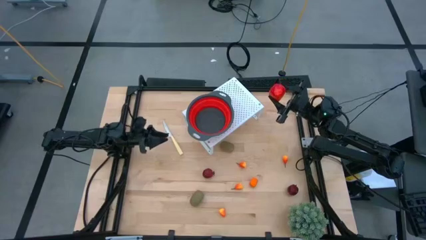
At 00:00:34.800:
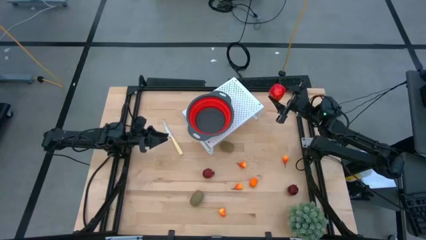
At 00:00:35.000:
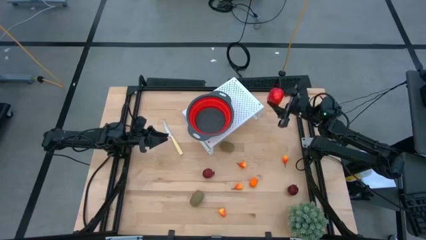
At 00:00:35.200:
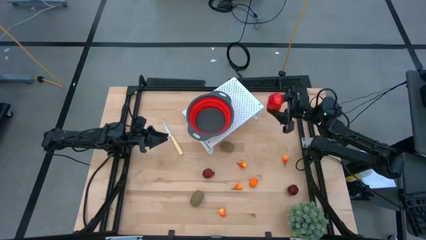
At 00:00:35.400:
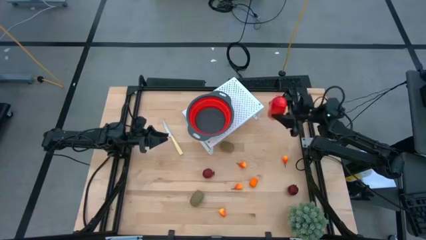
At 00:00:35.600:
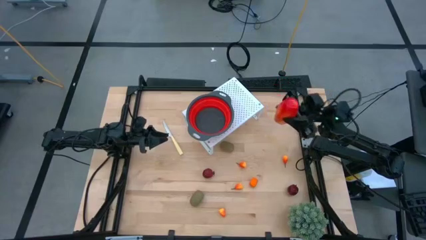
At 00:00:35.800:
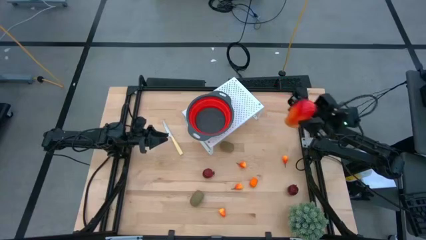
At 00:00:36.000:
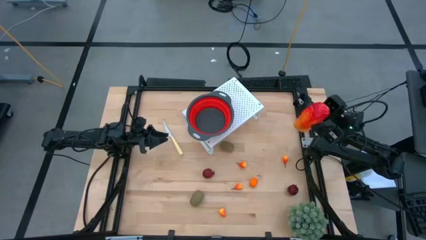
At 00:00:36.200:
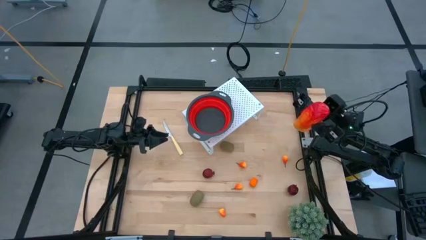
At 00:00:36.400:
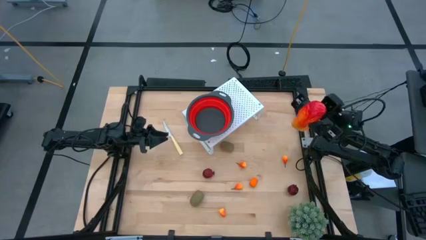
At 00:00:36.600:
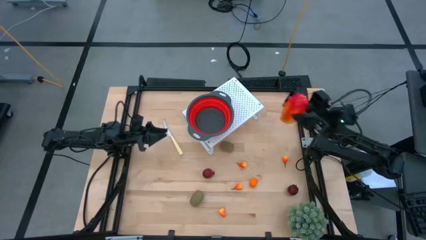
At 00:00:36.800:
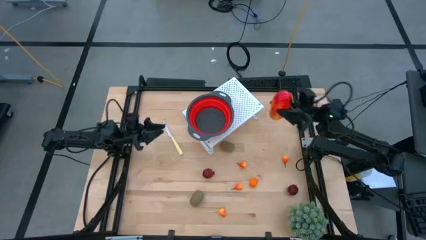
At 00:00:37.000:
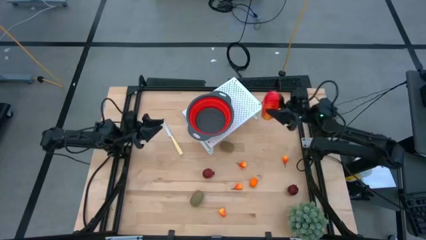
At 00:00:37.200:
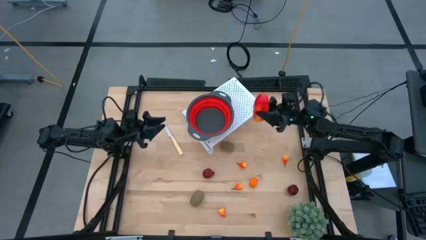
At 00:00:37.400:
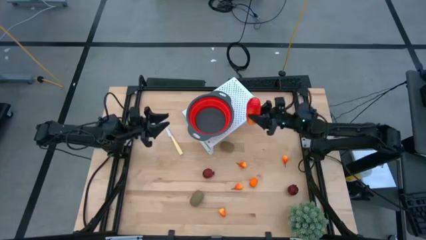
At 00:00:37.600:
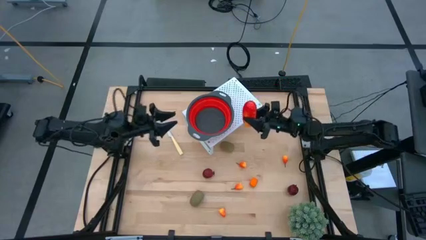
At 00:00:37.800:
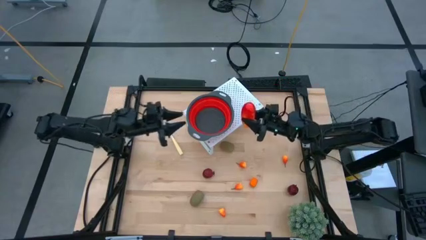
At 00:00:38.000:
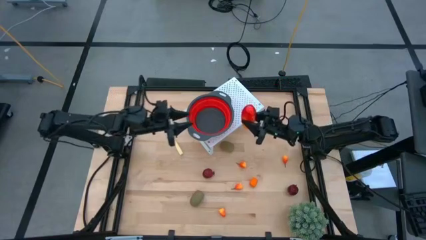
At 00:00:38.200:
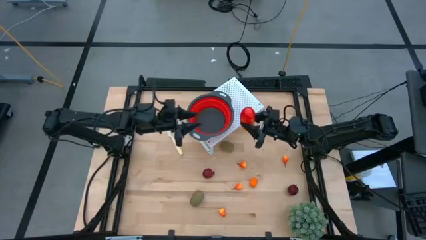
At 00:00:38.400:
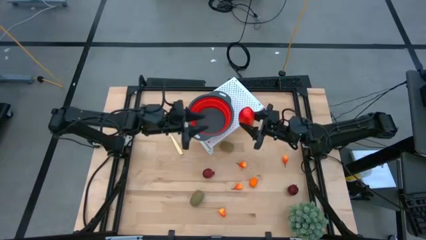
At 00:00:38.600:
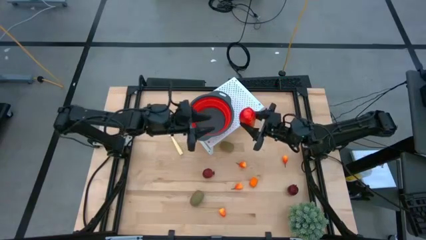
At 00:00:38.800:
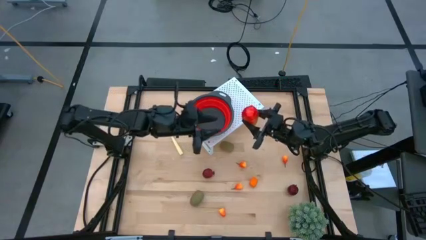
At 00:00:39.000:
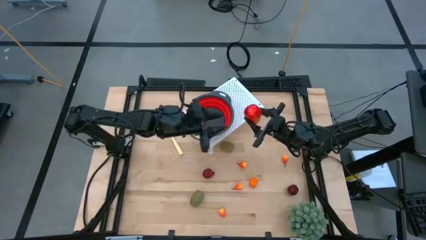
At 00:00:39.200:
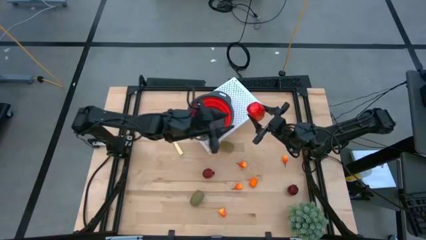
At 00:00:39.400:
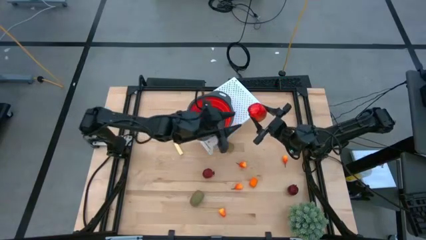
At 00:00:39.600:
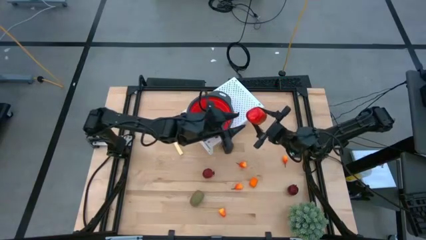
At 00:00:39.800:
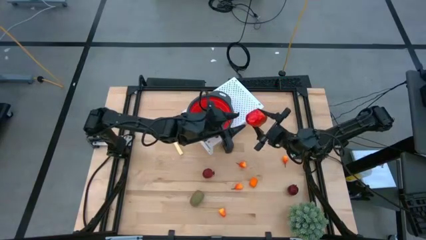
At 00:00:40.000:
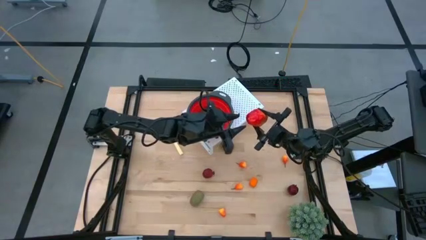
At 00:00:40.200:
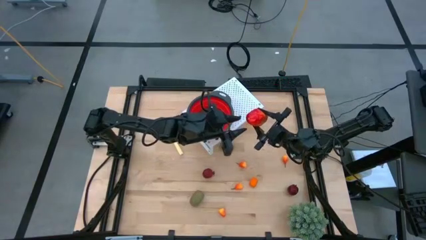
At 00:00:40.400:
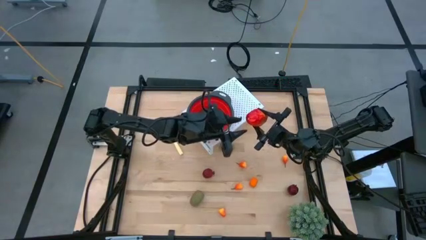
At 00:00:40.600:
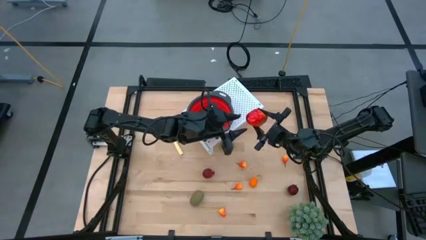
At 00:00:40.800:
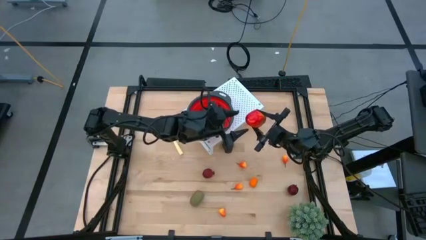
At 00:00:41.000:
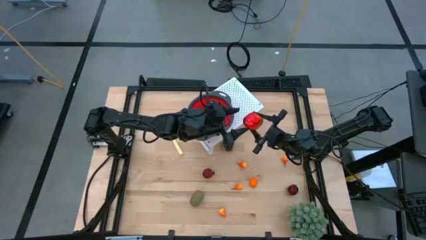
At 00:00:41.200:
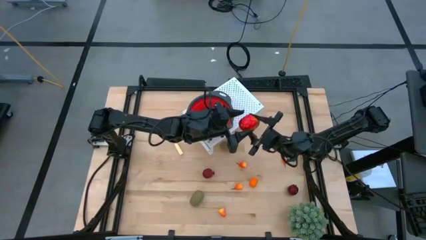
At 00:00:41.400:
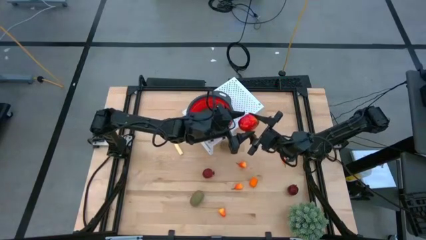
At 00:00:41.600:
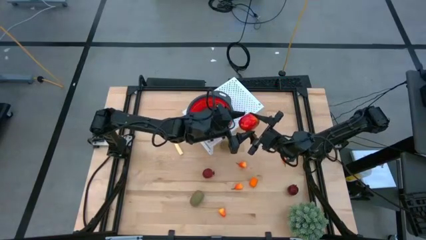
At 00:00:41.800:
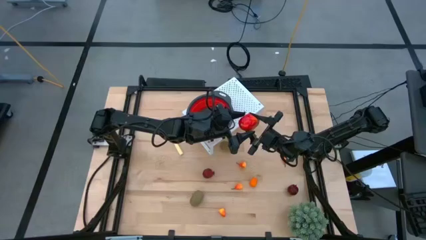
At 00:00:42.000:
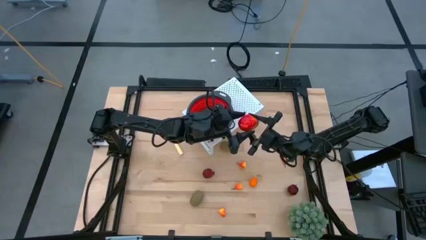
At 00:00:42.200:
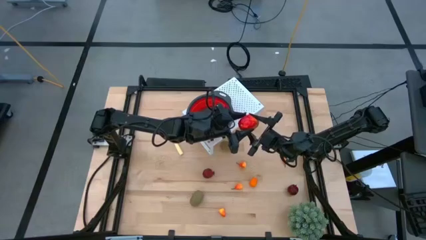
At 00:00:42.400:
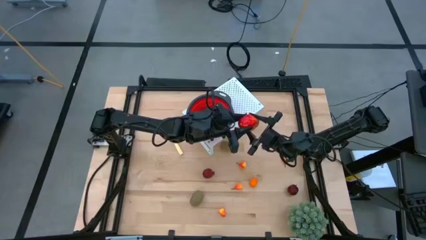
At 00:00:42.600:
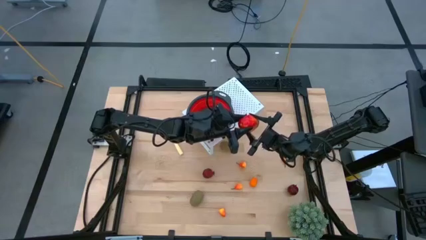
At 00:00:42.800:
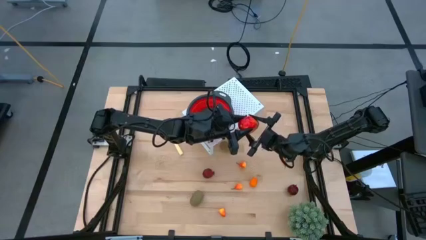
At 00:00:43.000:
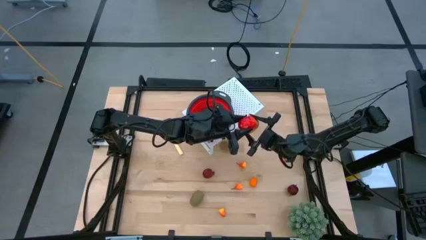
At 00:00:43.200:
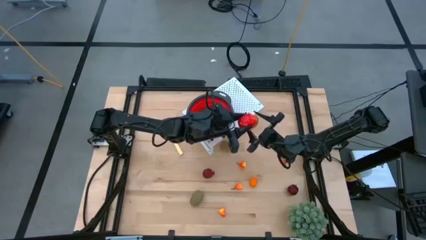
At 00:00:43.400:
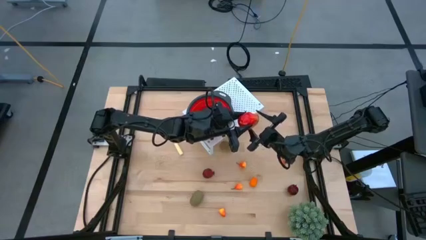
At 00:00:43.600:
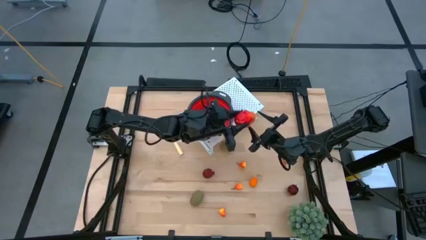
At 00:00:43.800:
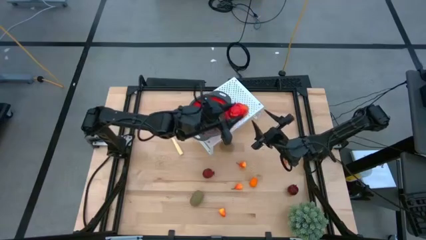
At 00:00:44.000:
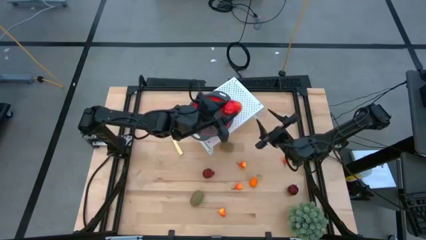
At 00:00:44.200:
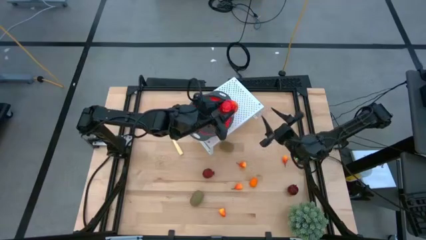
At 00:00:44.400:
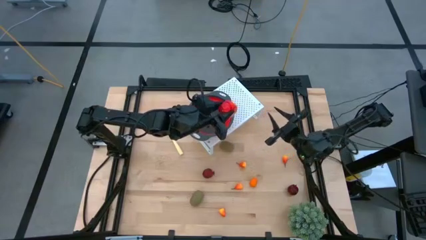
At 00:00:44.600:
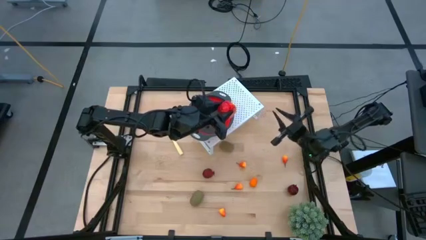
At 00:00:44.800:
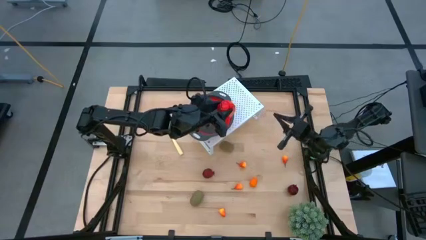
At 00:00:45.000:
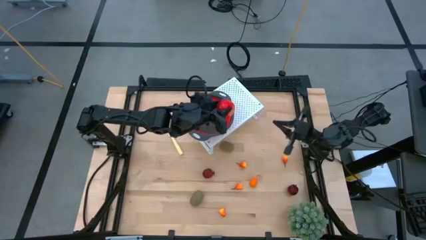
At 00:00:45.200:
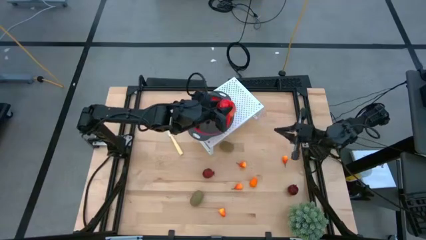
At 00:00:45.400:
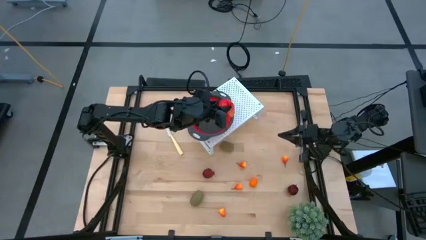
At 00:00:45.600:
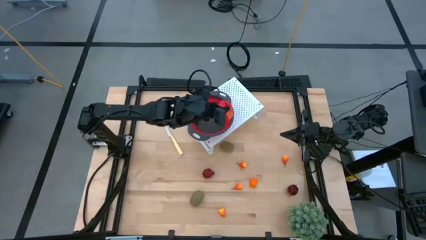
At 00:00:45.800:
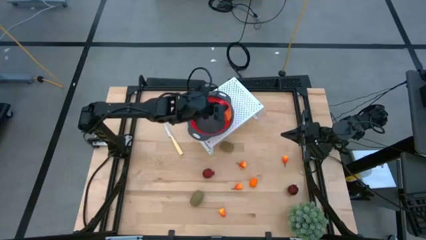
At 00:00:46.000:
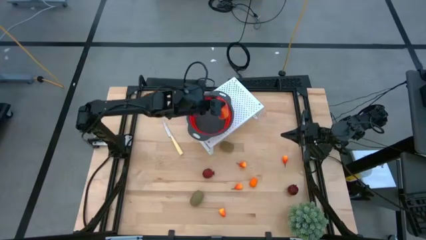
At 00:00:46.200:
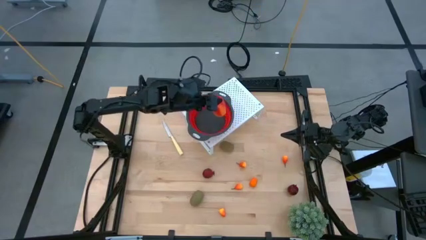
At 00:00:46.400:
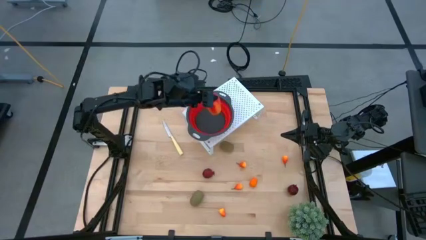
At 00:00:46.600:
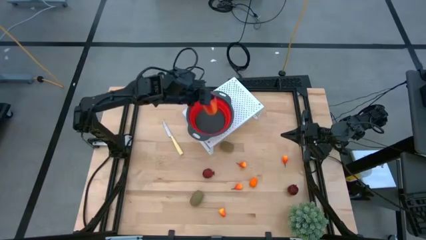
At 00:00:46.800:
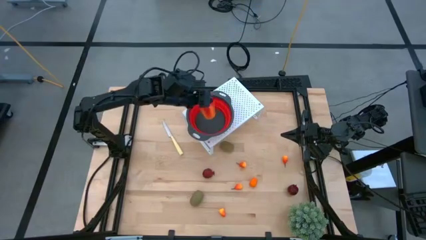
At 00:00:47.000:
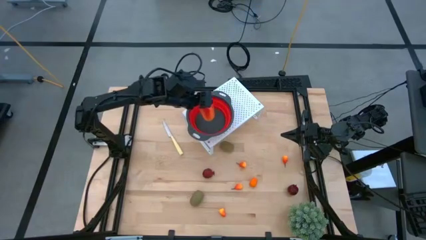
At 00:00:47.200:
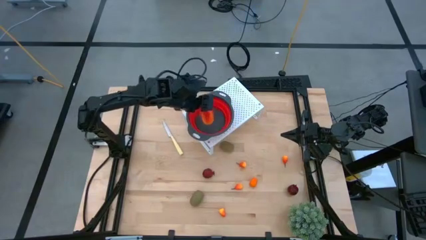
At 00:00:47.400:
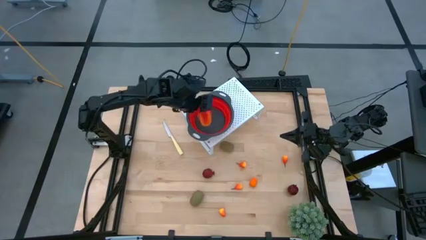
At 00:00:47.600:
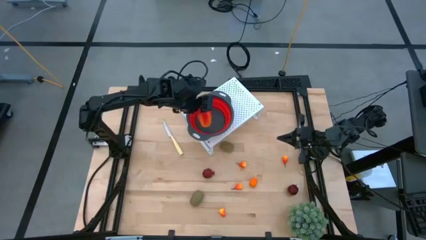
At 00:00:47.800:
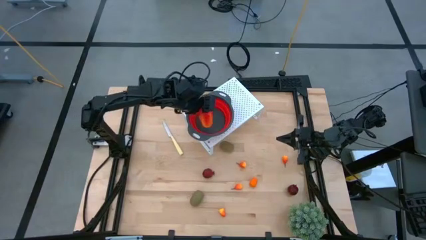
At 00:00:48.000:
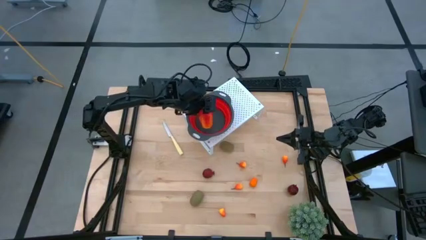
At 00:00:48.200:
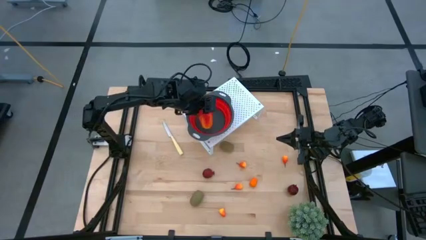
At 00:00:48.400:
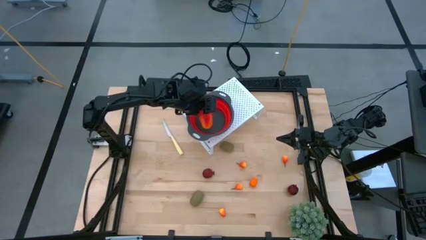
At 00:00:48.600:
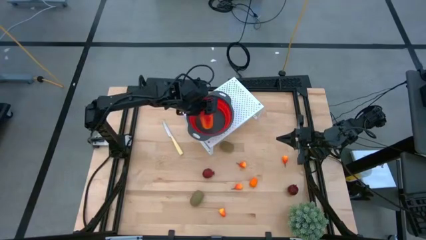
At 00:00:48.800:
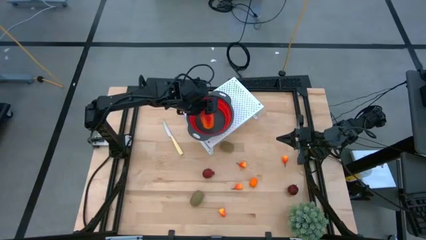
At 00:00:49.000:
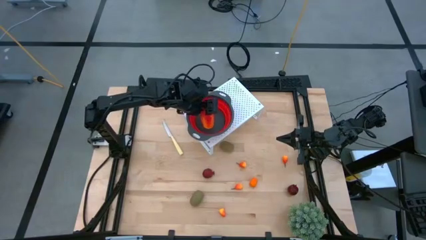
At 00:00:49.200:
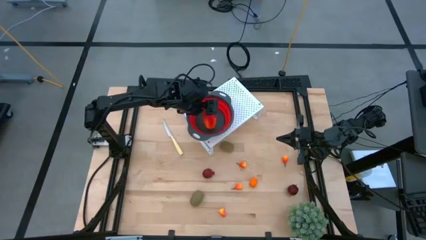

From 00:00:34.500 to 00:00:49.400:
Task: Pick & Place Fruit
Put the mango into the red strainer bowl on the shelf
